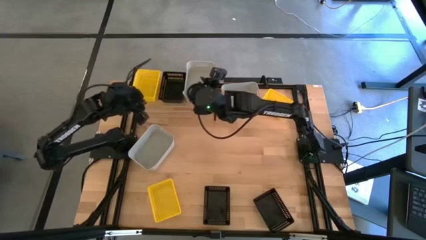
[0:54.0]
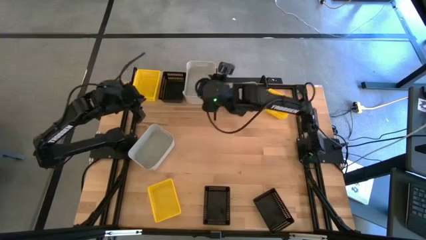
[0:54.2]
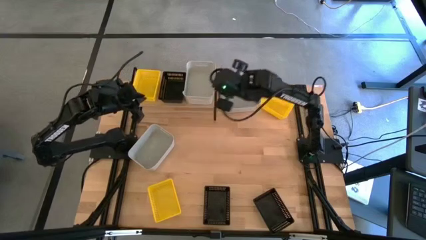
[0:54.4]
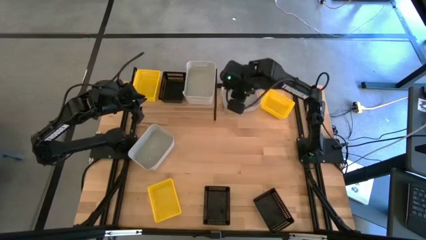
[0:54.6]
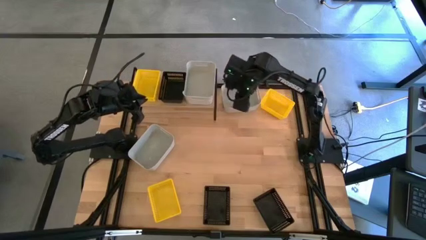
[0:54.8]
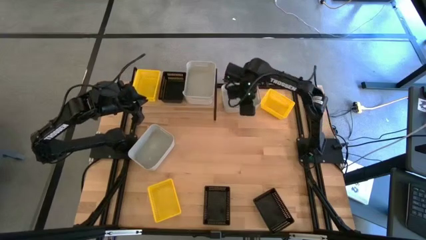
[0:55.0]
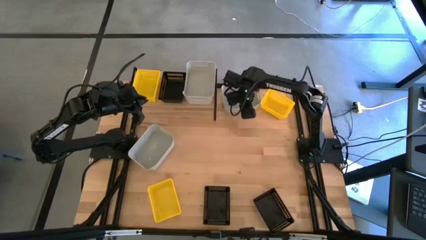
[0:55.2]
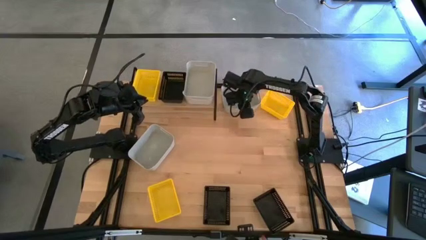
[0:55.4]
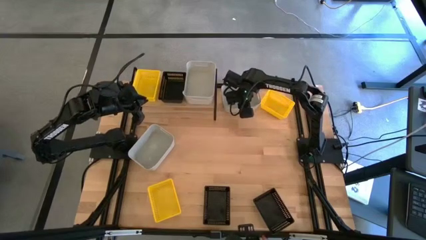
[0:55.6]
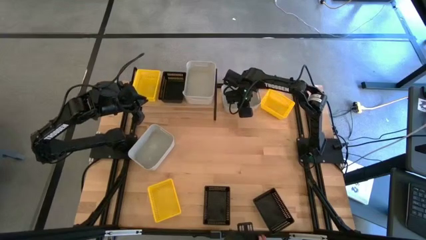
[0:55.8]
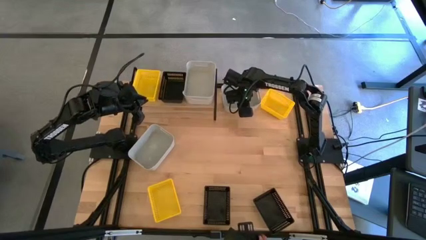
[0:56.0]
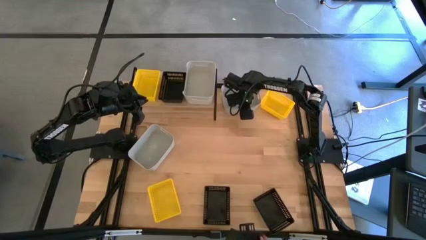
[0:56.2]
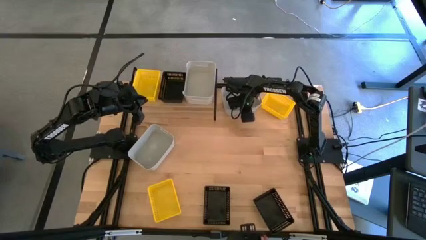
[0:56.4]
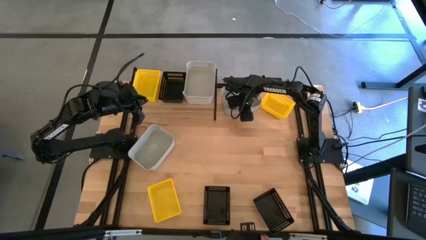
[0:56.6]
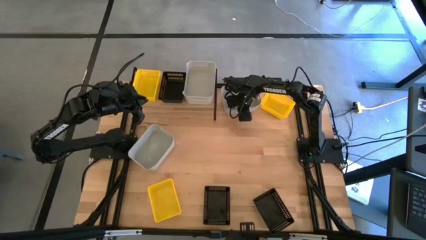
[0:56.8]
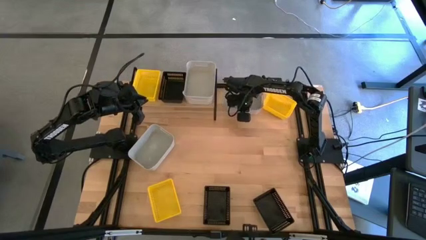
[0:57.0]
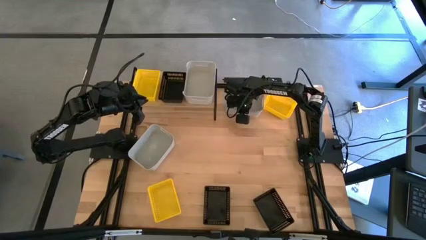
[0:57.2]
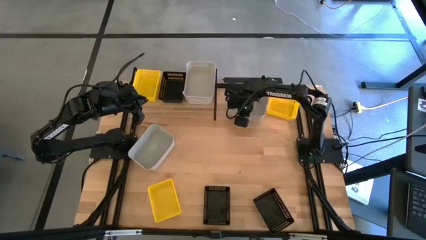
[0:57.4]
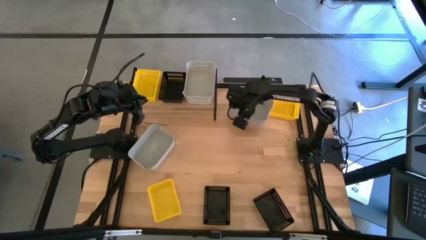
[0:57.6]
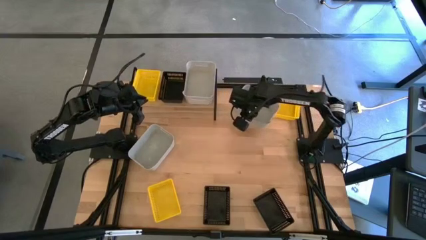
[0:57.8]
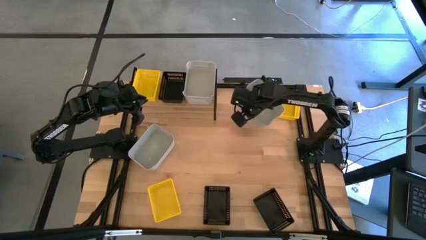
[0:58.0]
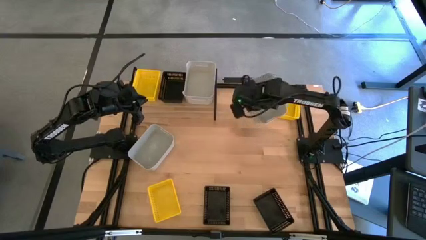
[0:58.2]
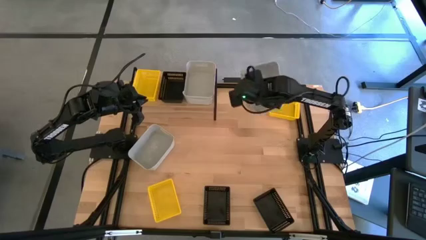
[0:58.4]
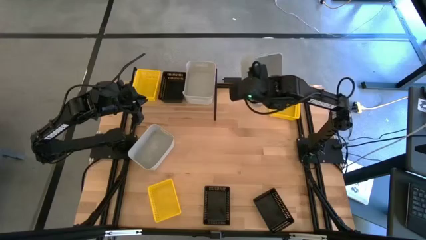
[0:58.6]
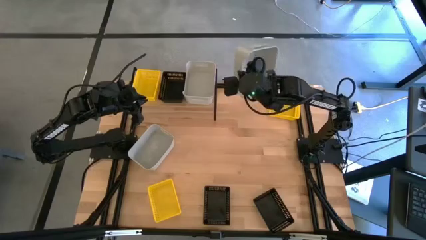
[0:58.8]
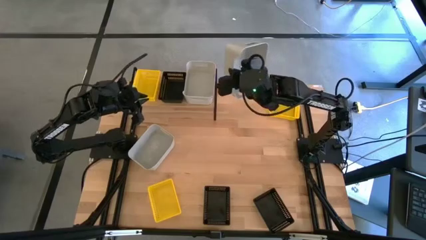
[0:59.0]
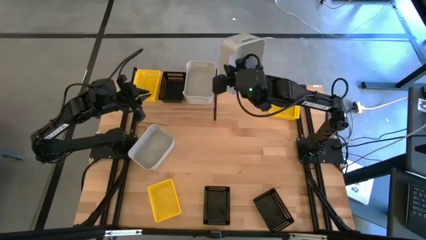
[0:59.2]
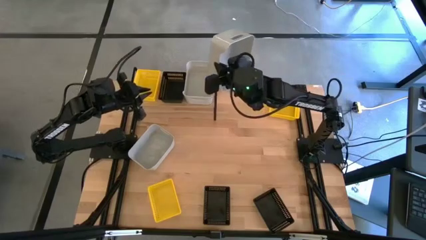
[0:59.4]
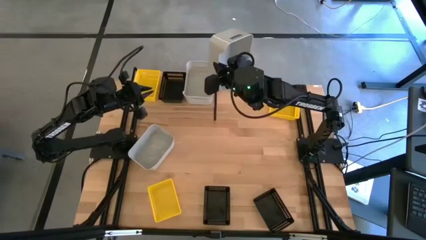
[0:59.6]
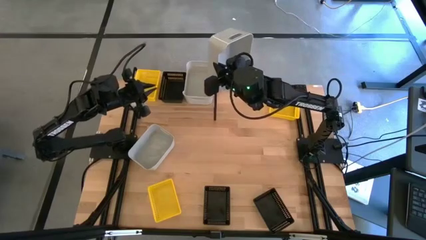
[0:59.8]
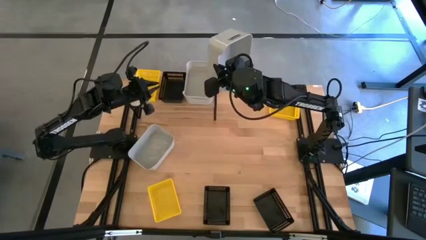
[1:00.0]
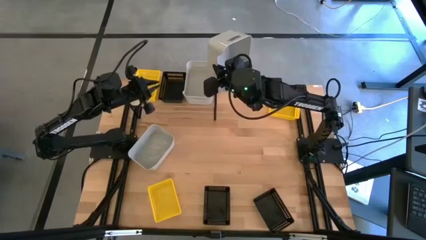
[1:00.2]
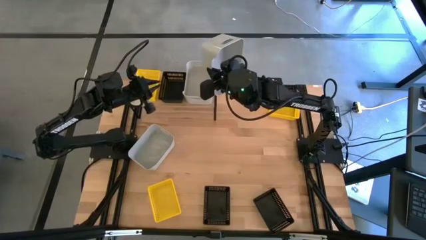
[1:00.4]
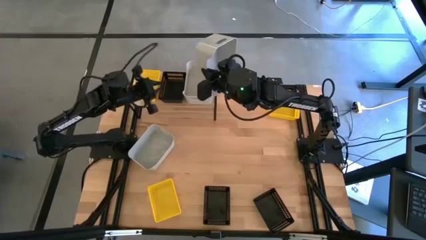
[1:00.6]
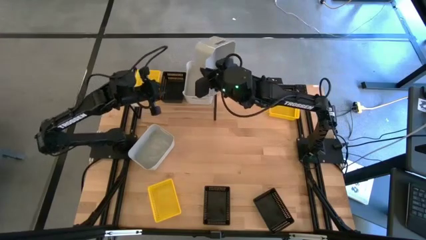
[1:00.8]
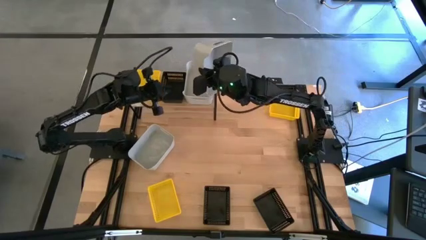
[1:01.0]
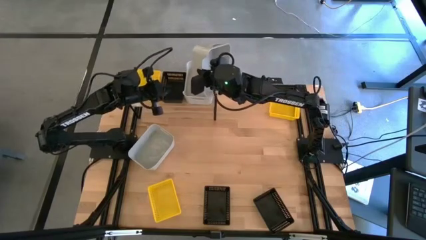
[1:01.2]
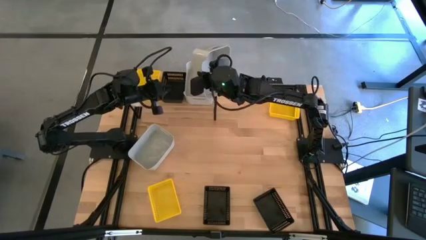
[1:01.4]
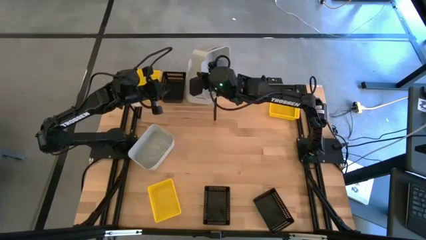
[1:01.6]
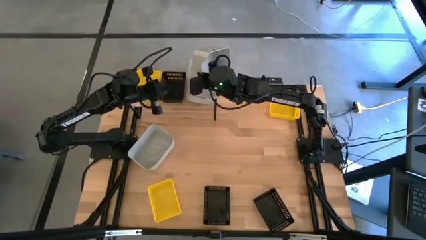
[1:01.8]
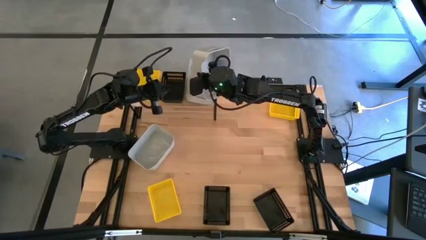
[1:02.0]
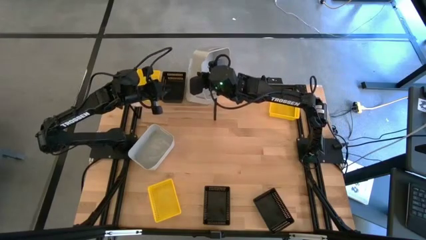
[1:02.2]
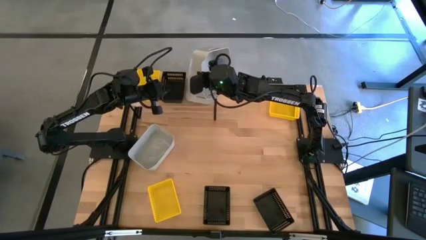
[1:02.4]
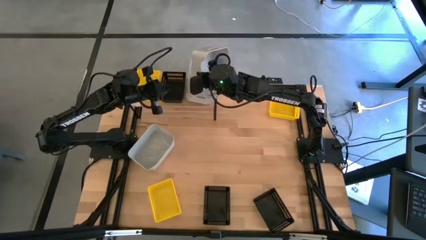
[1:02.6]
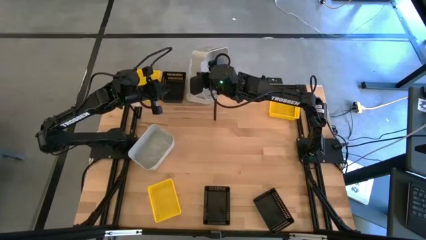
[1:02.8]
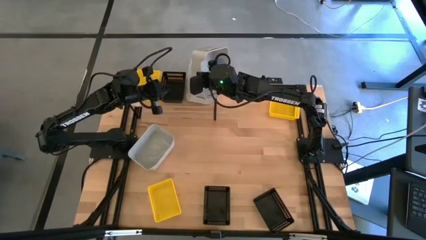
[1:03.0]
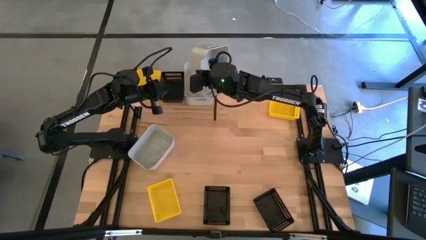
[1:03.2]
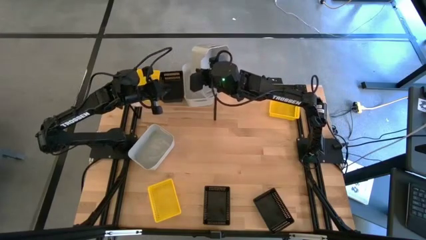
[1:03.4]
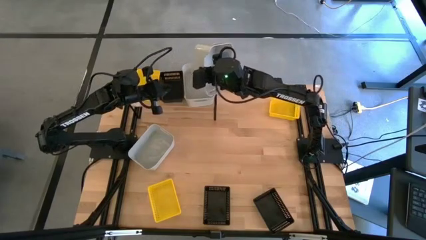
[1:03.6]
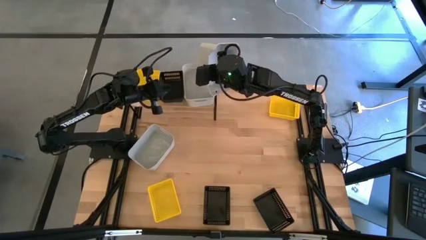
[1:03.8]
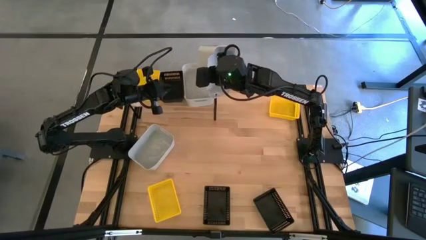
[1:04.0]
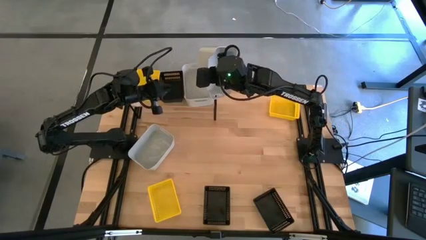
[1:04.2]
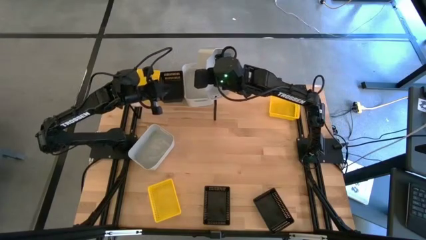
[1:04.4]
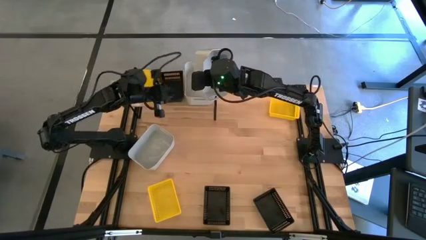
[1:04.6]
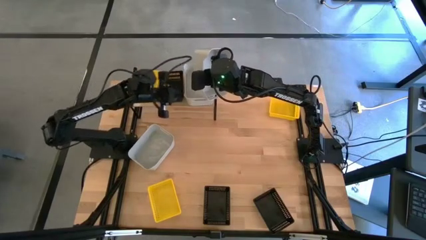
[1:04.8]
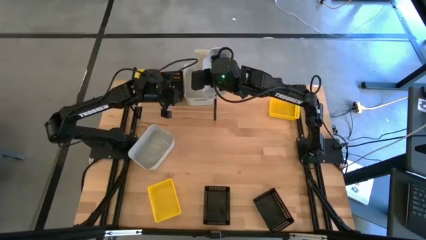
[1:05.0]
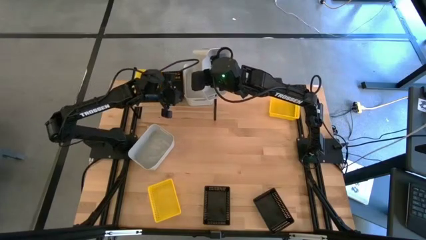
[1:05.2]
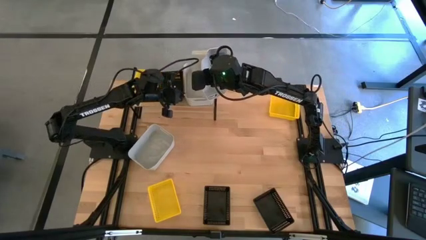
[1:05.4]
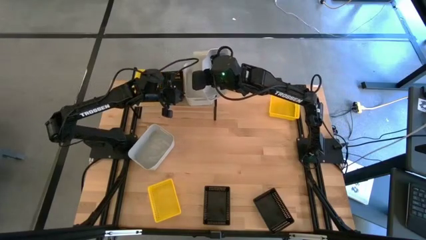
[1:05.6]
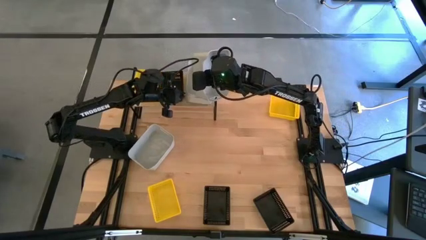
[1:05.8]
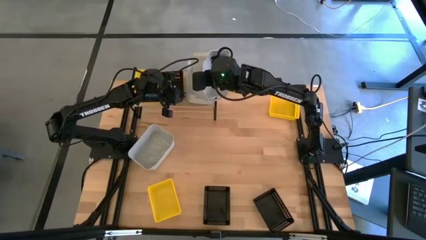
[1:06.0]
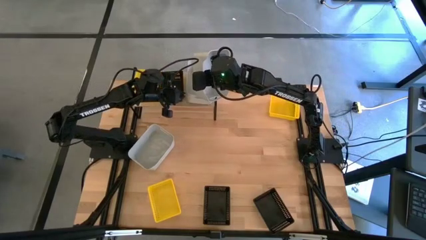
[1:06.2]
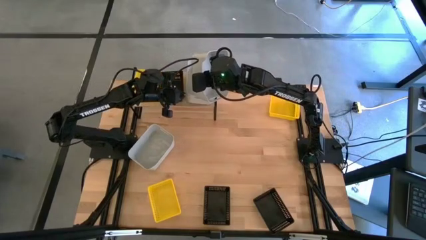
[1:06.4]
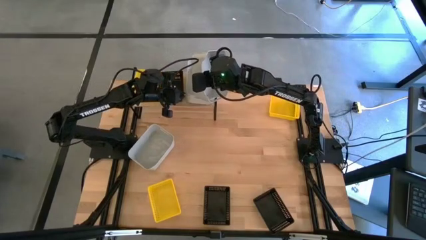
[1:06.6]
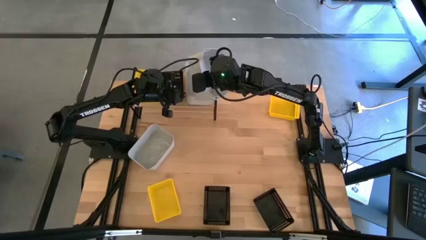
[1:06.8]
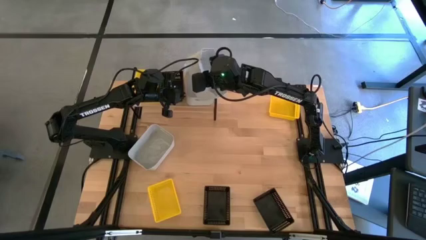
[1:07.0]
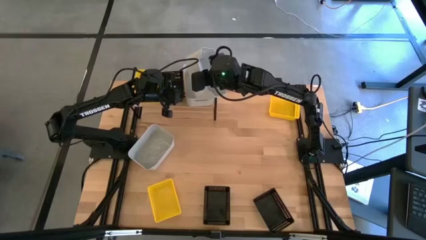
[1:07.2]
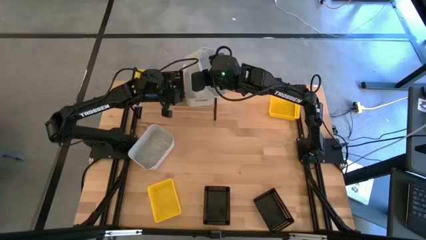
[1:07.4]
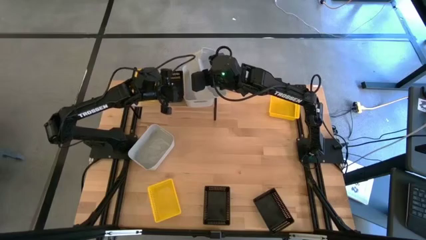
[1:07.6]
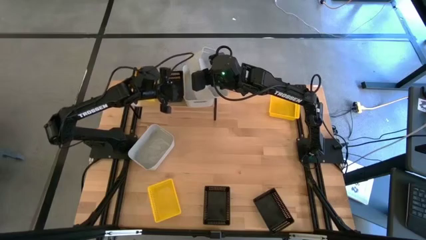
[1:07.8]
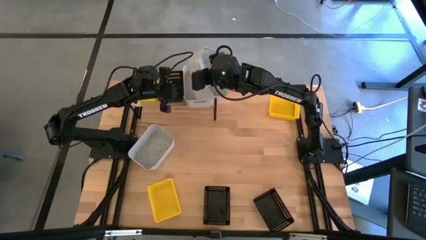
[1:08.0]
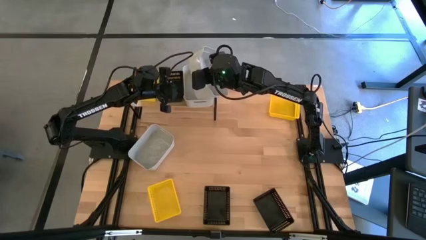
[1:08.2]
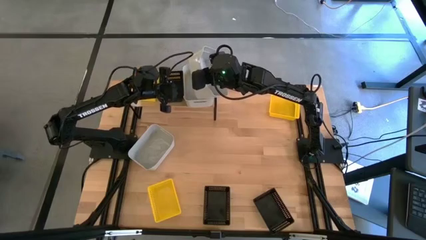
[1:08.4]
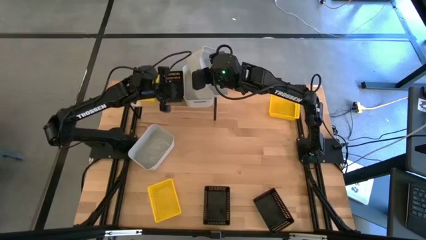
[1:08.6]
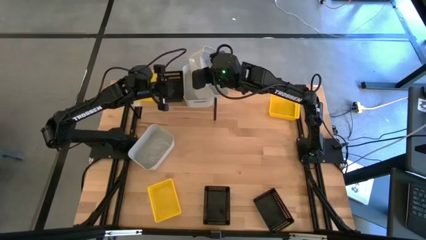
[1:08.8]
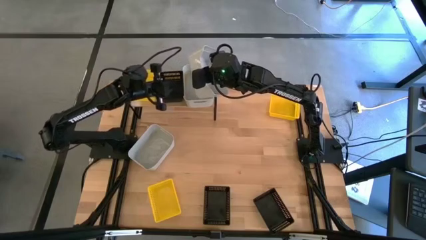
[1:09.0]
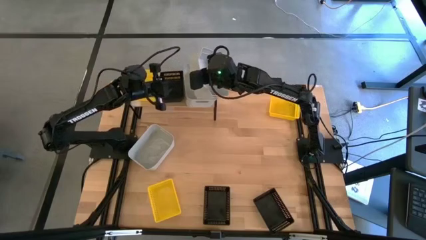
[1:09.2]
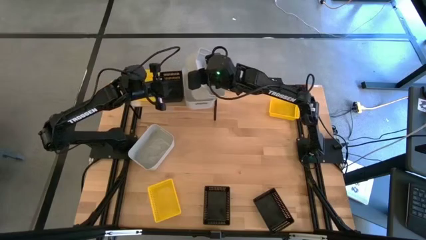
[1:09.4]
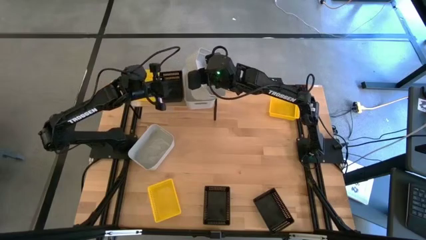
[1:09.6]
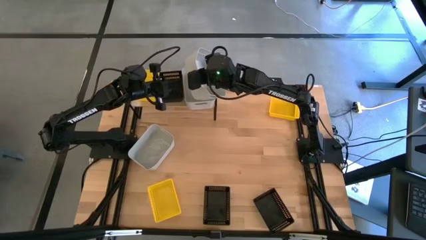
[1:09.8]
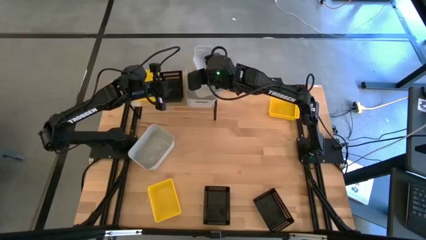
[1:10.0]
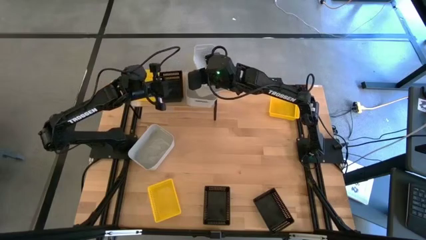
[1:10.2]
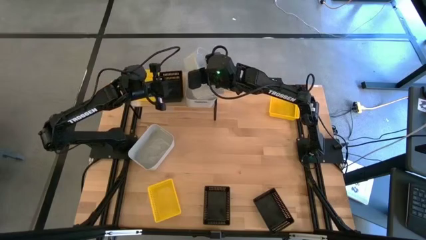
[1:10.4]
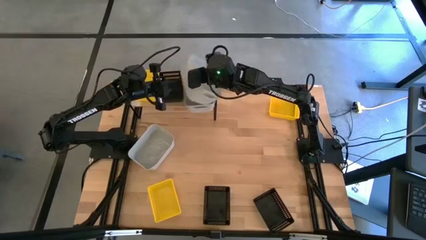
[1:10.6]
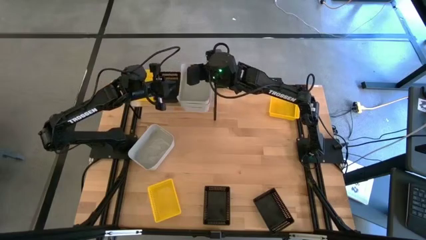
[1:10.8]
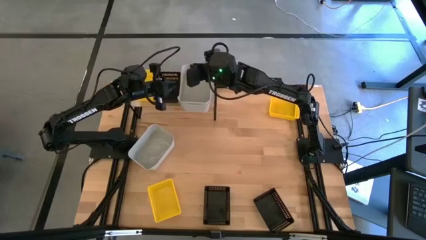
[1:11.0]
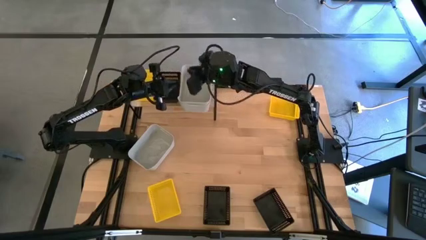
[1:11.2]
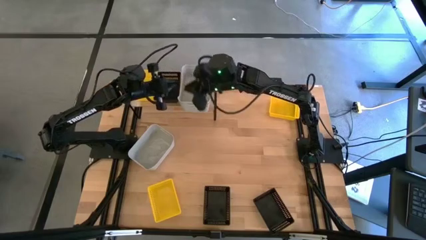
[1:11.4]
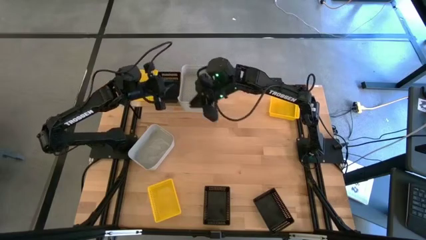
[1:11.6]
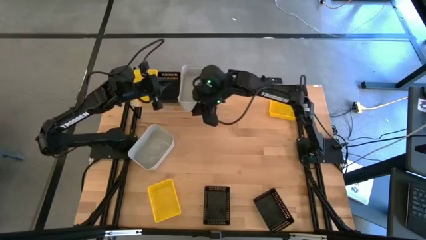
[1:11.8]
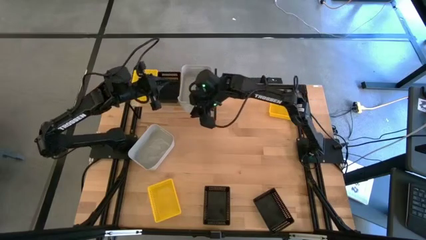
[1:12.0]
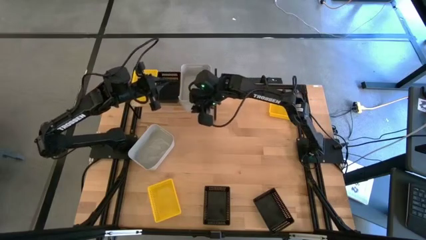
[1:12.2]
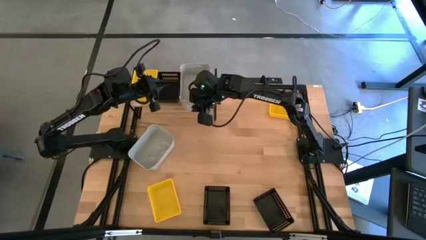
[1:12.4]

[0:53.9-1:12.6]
Task: Stack baskets on shelf by color
Stack the top gray bin on top of the other gray bin on the shelf
